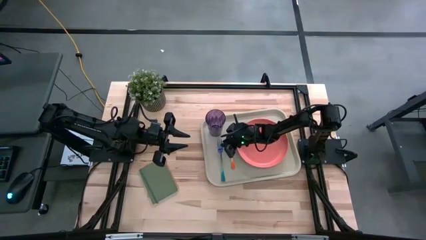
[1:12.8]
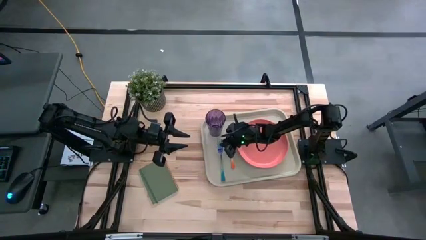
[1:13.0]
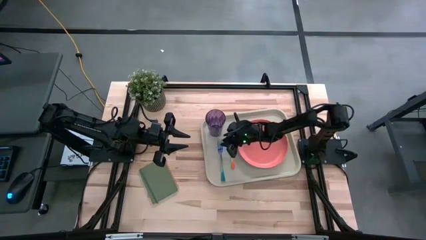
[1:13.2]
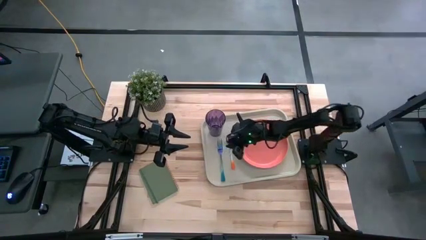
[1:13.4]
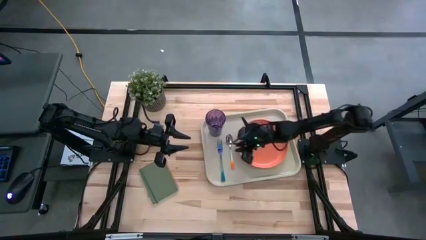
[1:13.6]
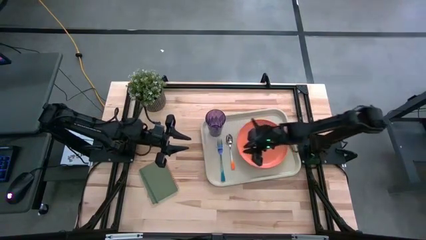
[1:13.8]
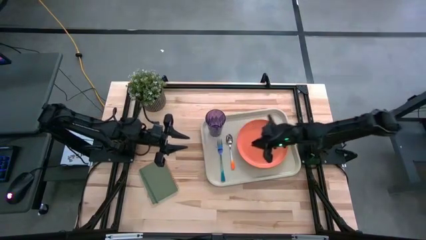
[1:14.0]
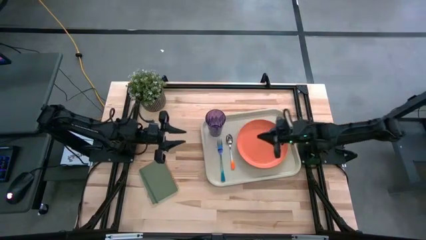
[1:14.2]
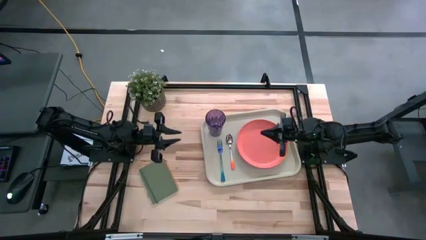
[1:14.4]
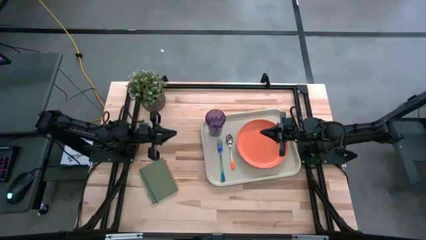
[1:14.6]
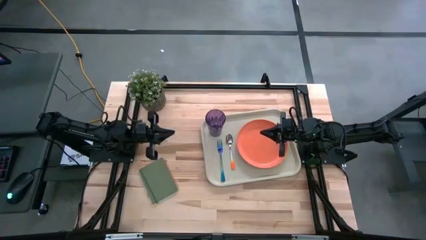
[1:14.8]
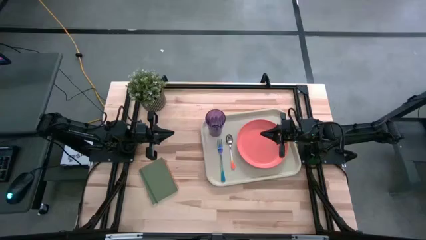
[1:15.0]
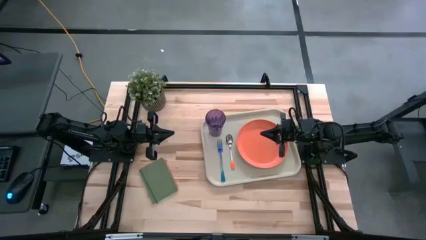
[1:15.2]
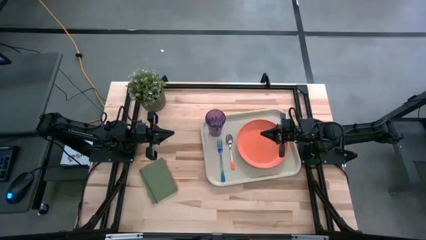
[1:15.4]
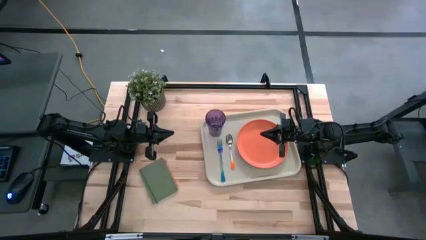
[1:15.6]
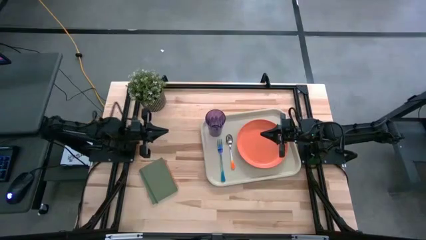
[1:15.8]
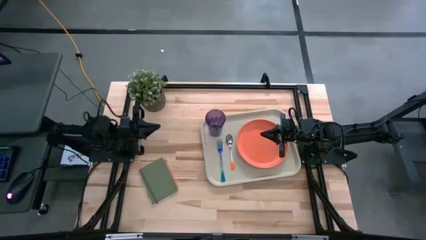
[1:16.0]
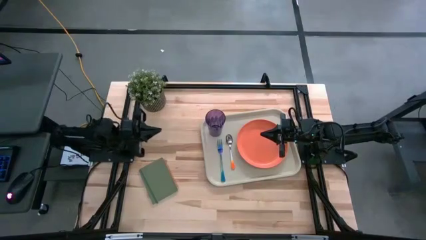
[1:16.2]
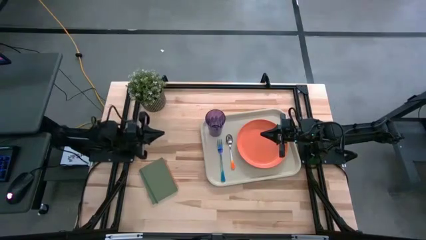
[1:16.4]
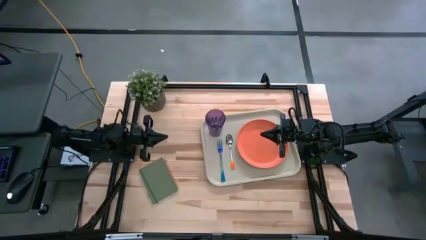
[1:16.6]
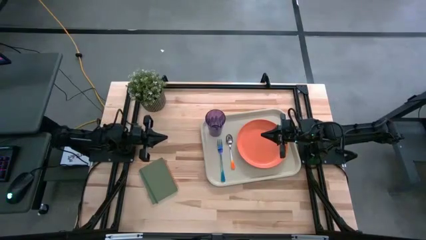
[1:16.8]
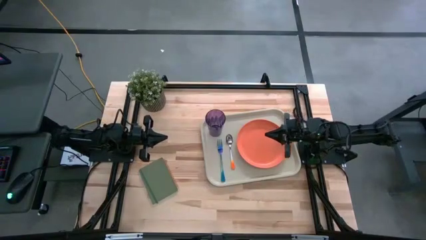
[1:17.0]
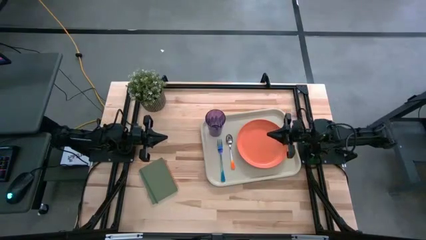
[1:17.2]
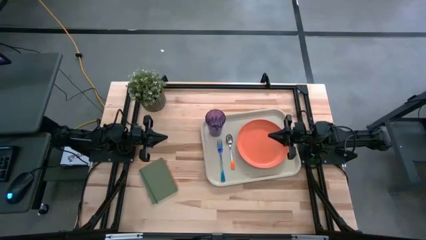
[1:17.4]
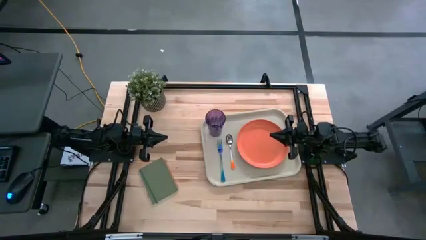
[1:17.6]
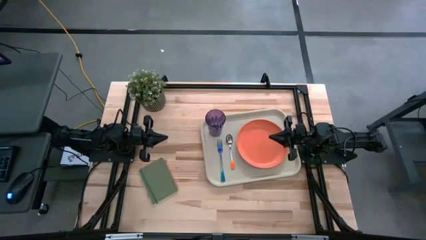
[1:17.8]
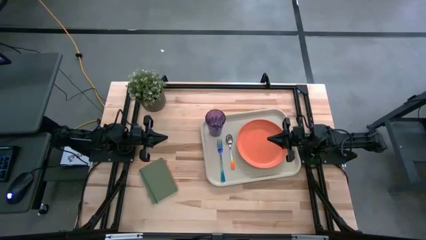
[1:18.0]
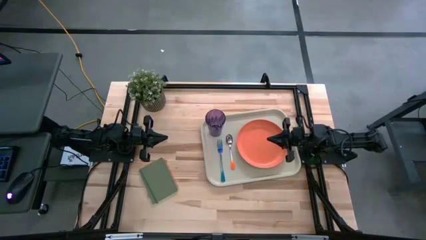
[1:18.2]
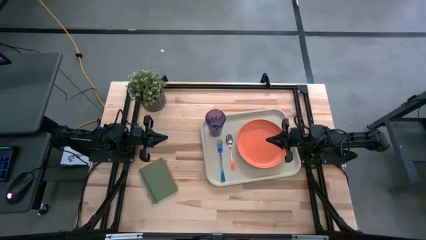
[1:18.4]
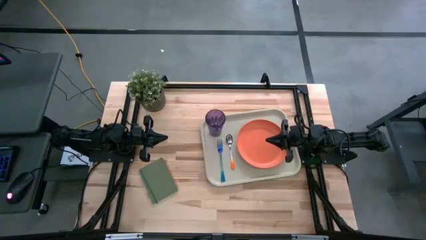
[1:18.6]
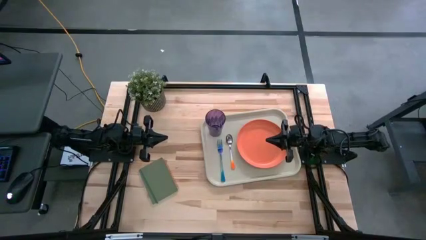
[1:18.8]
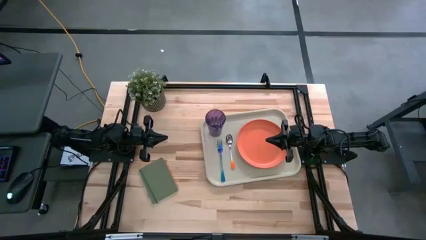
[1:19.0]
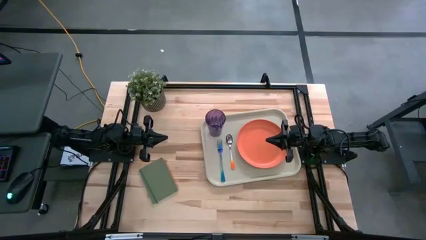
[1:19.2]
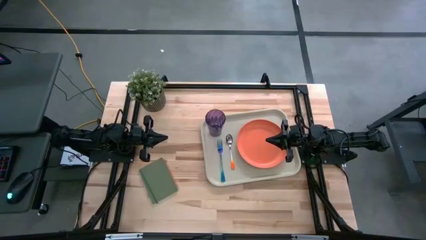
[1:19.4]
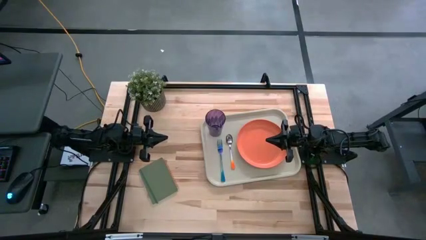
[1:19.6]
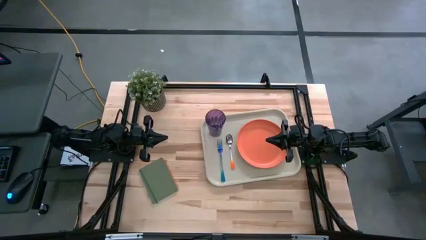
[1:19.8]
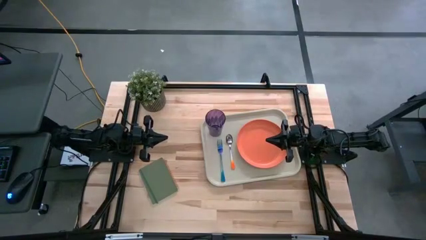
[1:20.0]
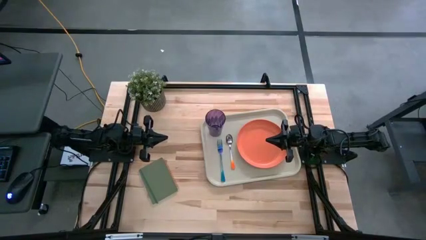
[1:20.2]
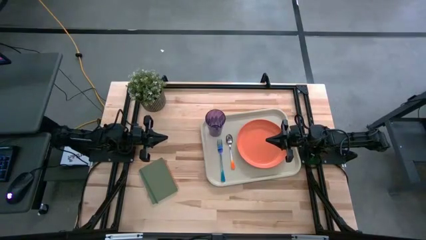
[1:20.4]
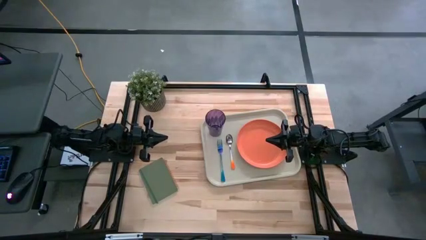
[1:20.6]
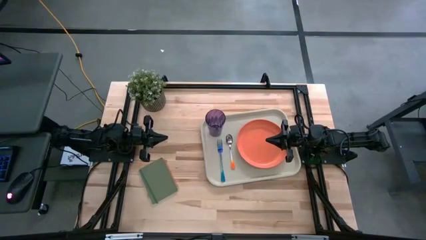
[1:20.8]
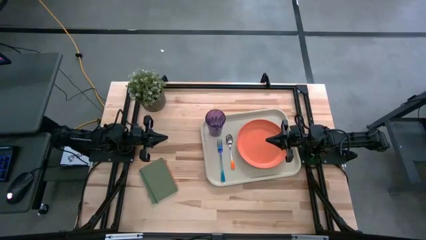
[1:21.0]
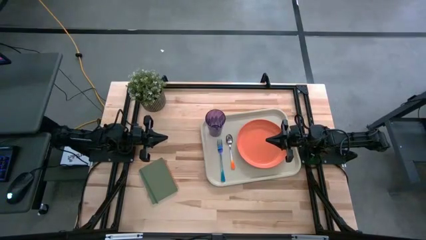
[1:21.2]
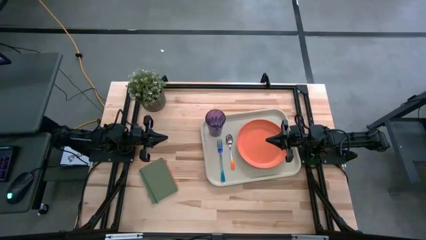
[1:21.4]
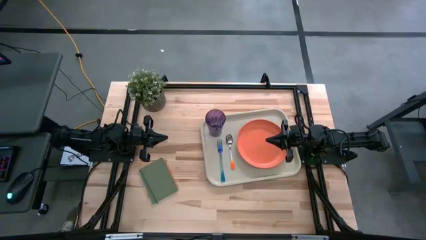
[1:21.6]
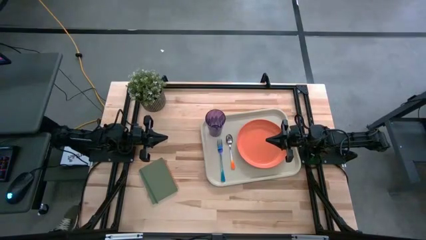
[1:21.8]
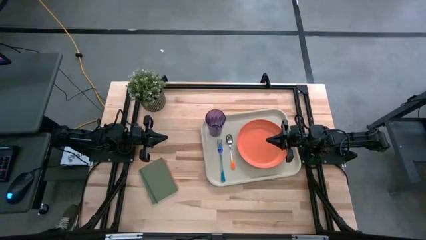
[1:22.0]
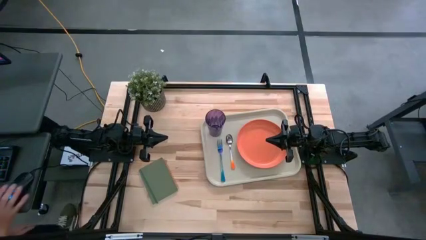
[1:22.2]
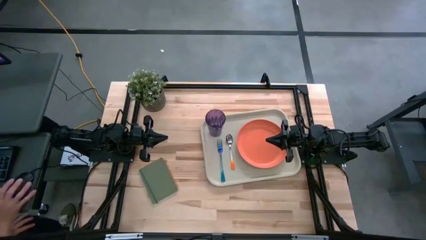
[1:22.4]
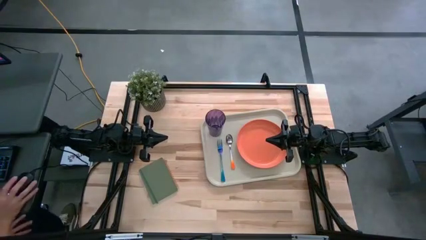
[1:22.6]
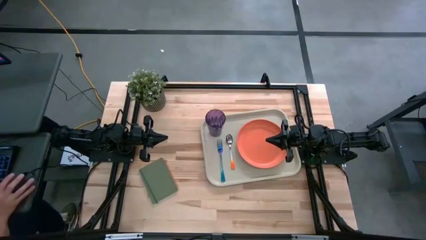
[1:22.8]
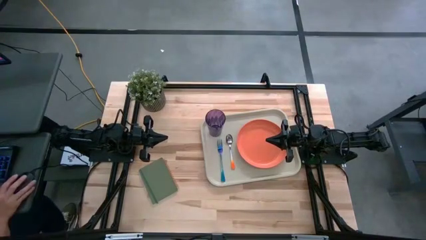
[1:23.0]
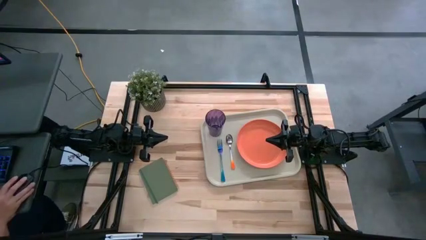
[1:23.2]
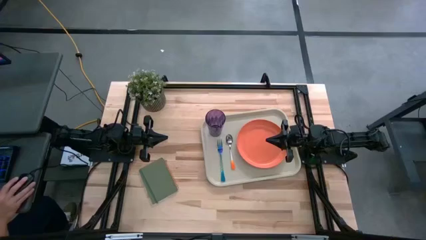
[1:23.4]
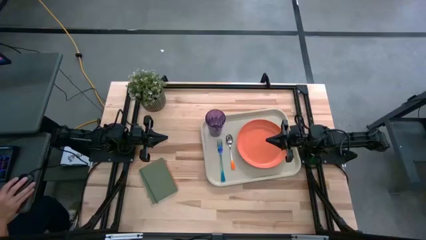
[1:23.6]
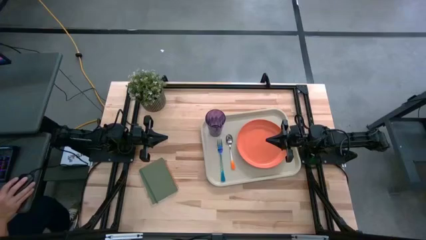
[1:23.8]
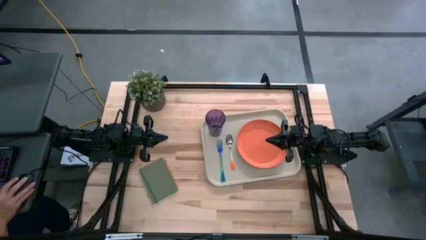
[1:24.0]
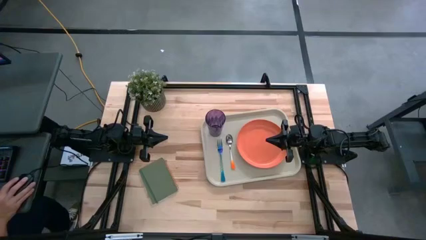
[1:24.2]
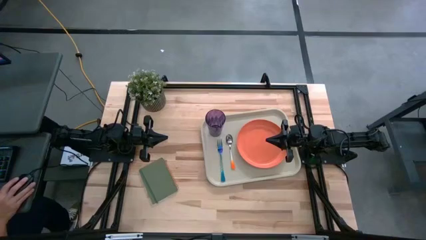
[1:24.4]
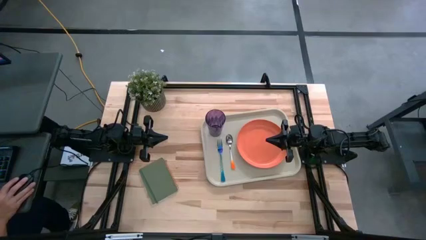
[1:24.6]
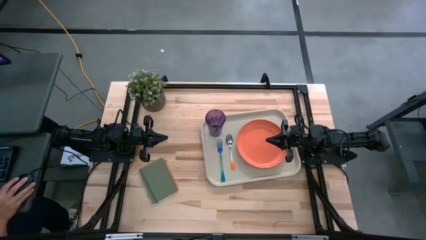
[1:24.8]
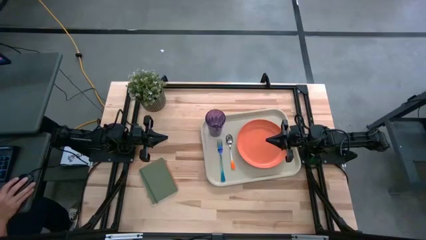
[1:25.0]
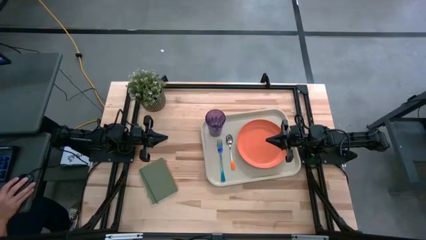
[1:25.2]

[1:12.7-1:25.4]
Task: Pick and place plate/cup/fork/spoon on tray
Return to Home Position

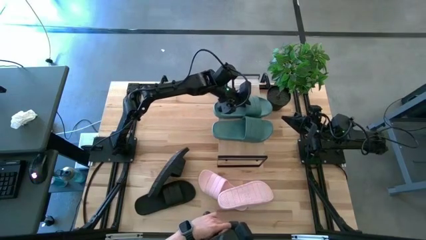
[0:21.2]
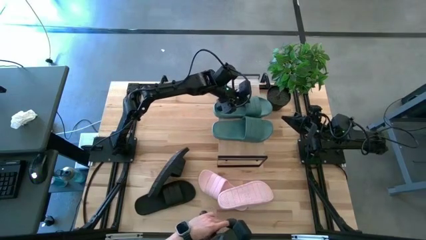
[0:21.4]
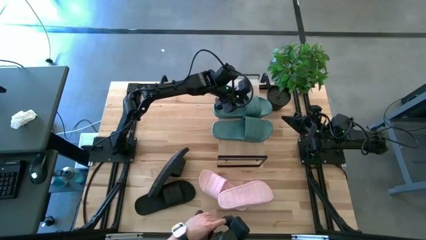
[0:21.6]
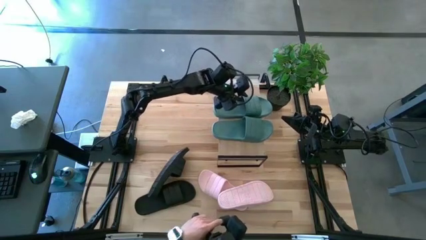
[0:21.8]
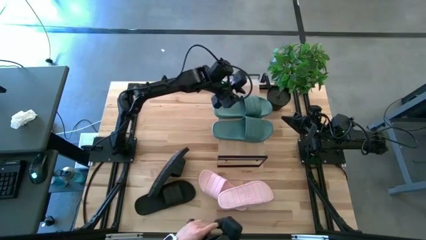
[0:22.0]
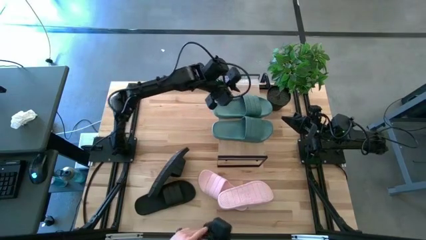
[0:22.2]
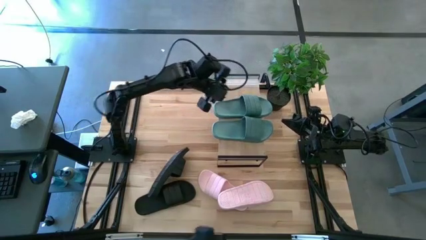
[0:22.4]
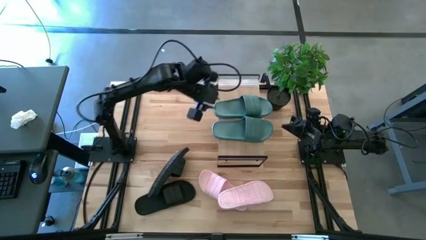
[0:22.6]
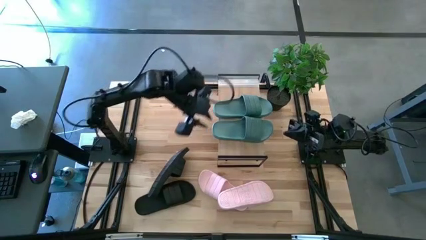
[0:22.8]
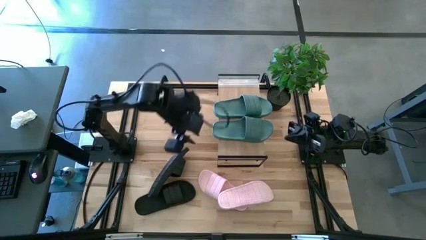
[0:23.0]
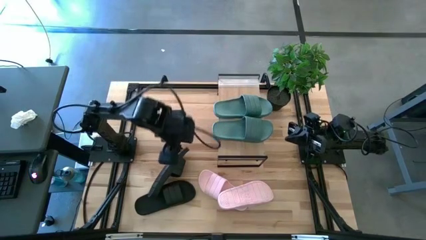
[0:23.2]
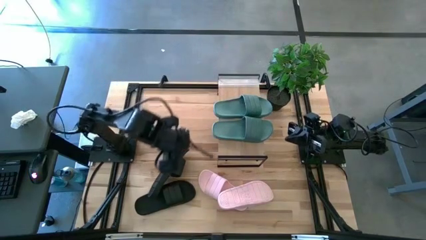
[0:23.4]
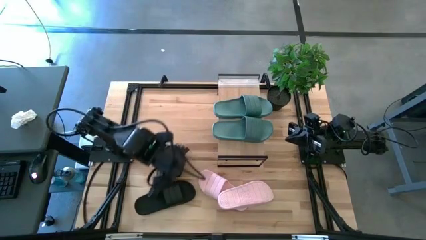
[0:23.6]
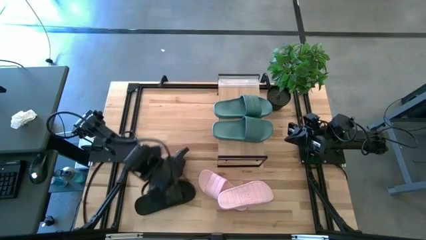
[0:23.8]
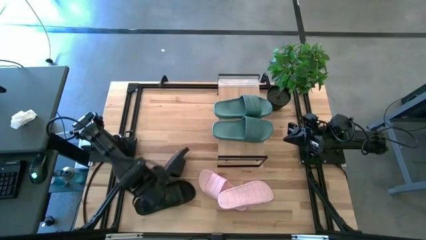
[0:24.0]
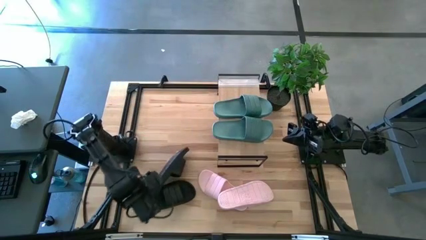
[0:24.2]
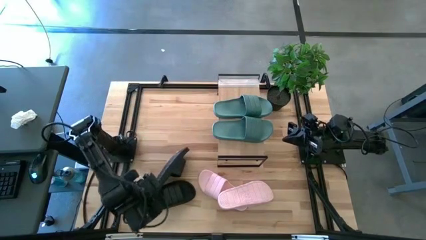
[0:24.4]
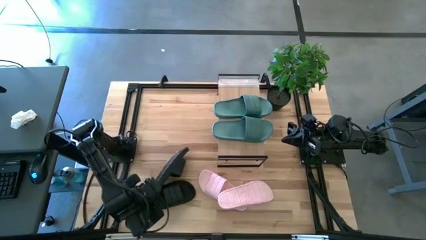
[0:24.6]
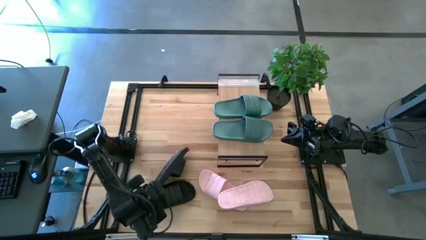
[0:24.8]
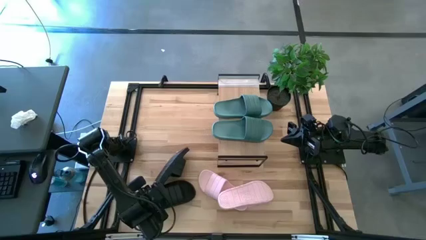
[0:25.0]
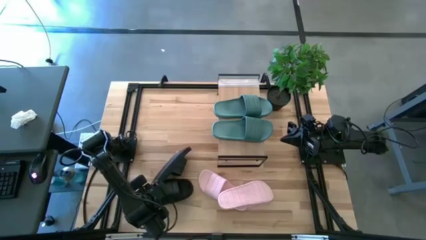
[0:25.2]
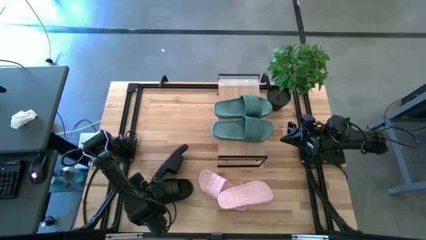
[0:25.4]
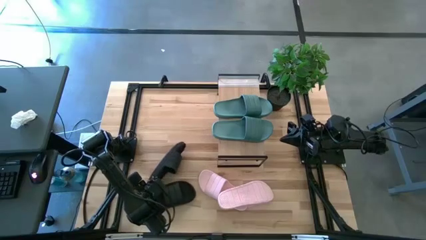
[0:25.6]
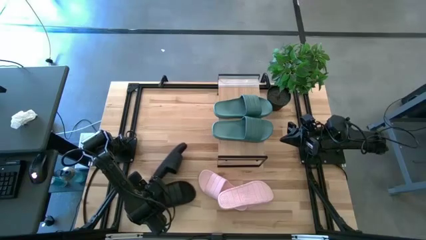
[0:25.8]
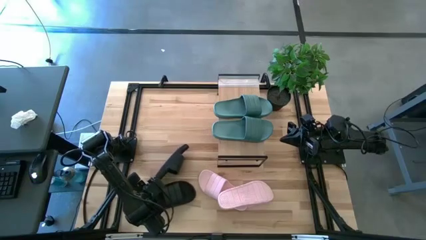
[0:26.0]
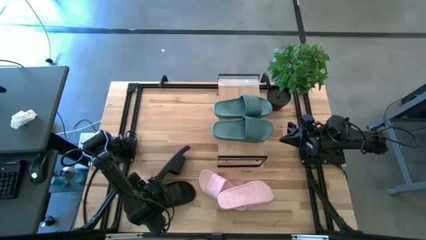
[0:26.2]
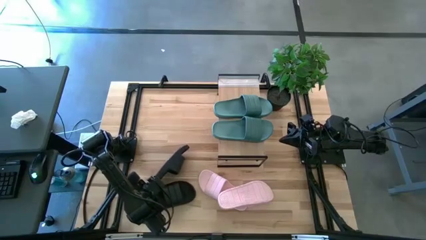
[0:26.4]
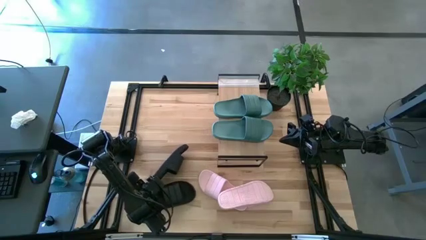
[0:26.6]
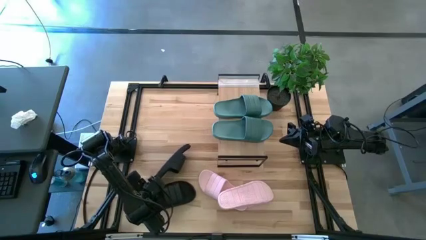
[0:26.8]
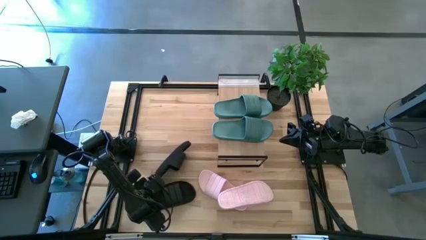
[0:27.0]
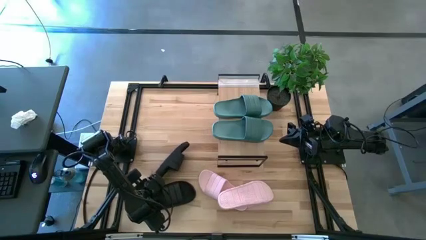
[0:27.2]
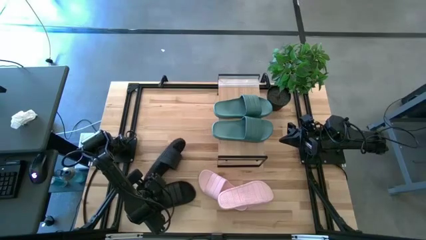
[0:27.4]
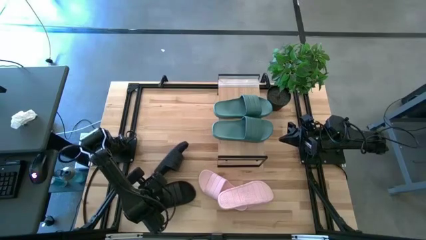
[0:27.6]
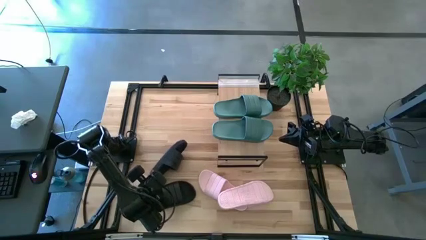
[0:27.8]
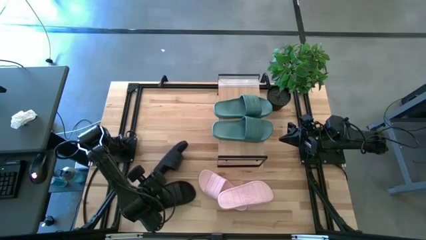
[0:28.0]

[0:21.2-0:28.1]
Task: Pick and place slides into the shelf
Put the top black slipper under the shelf
